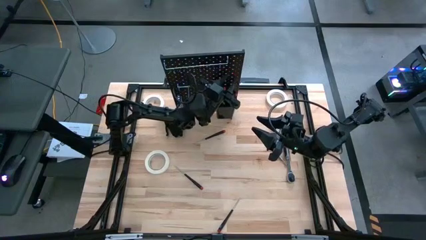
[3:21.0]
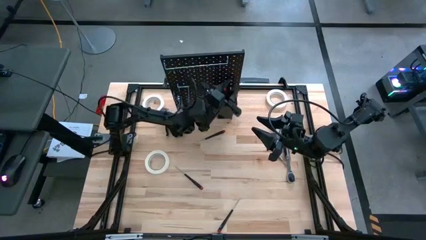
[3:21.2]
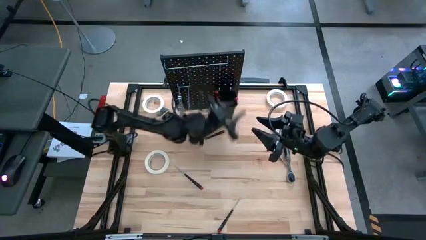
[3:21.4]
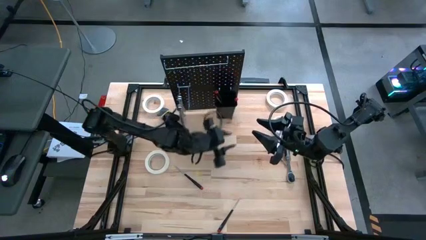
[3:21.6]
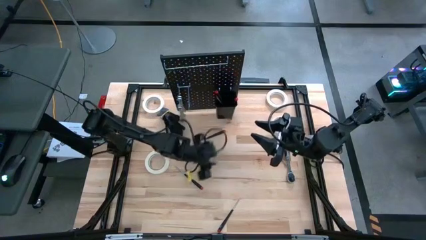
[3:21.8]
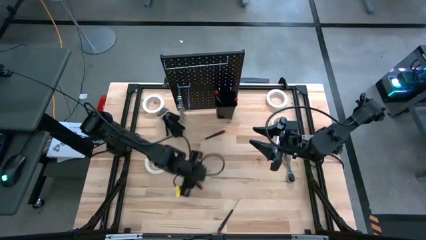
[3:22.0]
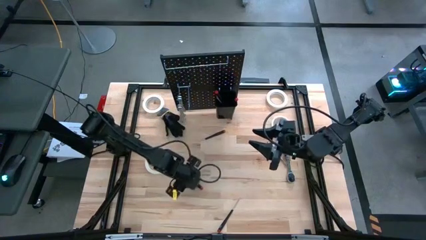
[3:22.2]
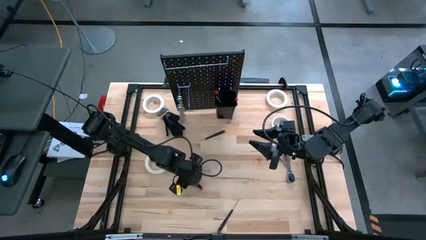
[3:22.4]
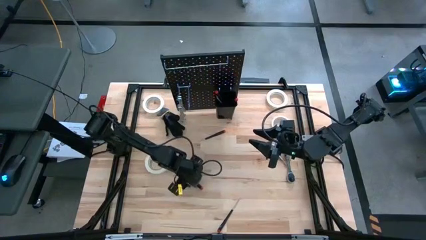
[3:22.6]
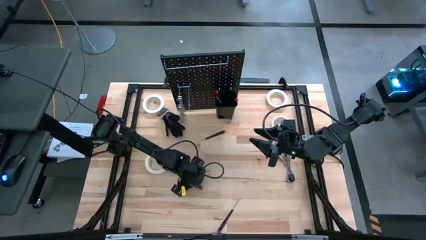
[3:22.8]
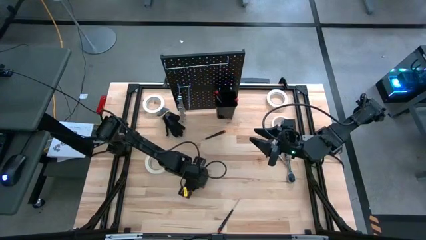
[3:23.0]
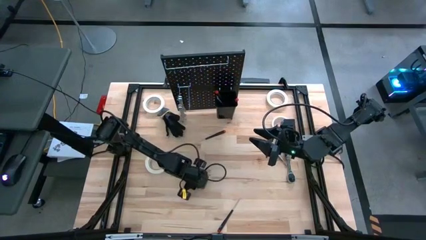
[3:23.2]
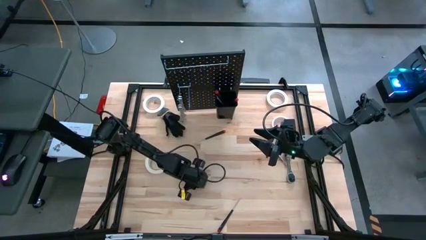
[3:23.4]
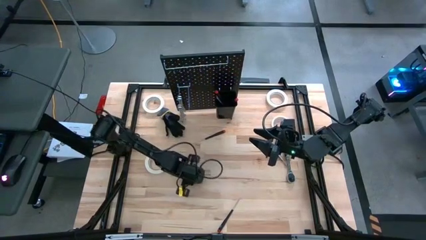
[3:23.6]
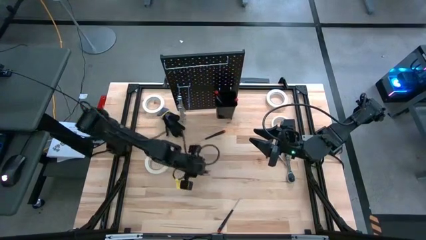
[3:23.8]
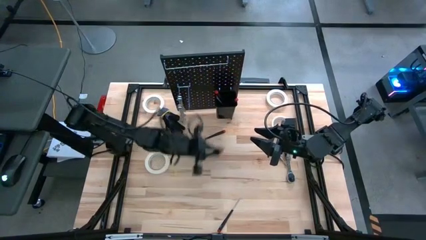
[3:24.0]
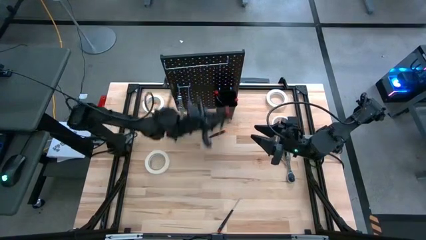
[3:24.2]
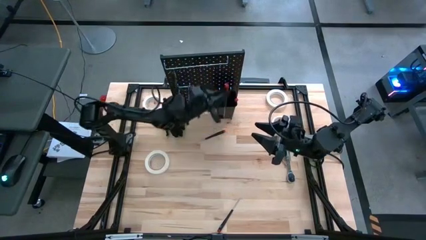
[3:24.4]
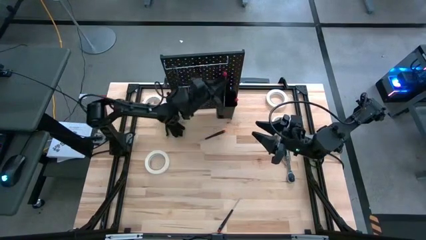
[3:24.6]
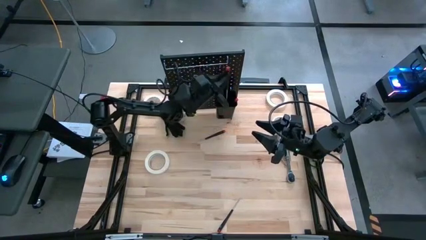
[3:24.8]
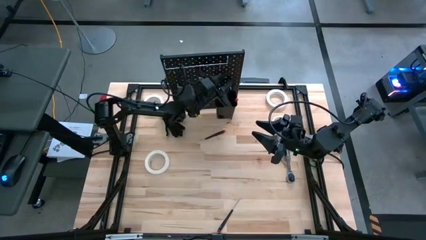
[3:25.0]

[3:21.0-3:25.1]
Task: Hang tools onto peg board
Put the black nut driver into the black bin on the peg board

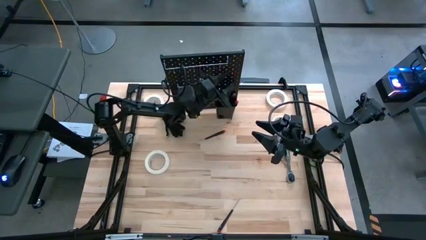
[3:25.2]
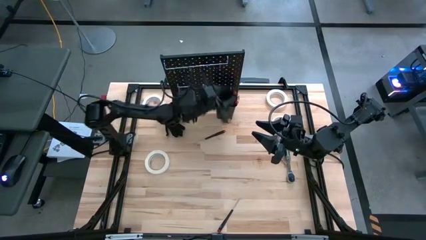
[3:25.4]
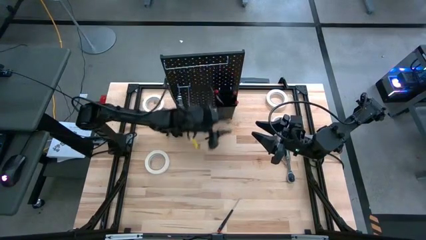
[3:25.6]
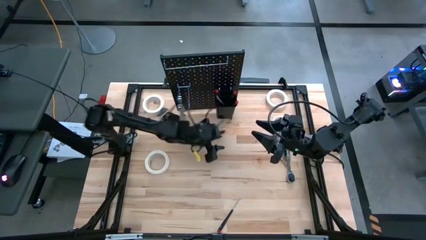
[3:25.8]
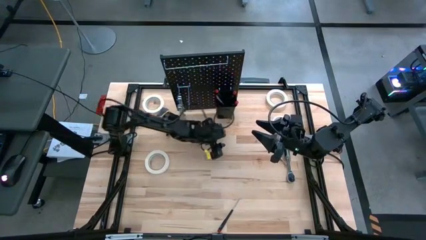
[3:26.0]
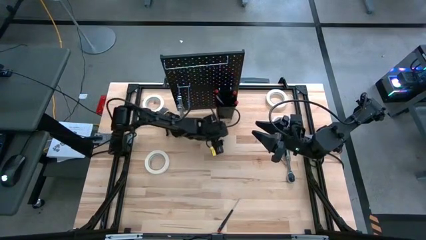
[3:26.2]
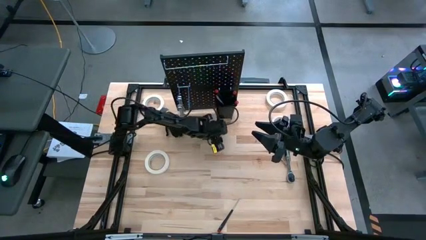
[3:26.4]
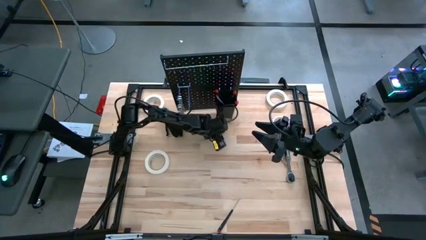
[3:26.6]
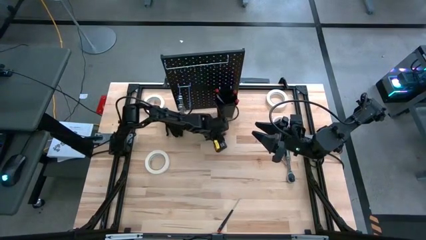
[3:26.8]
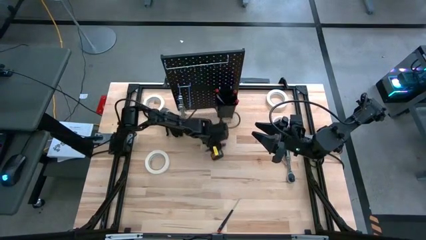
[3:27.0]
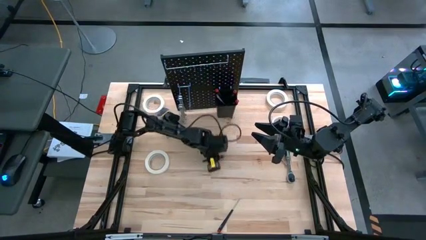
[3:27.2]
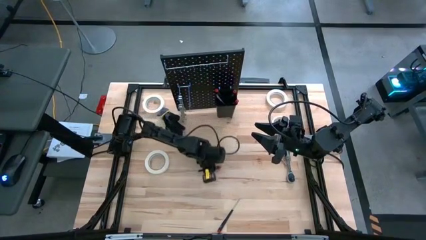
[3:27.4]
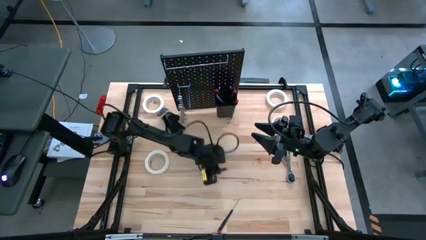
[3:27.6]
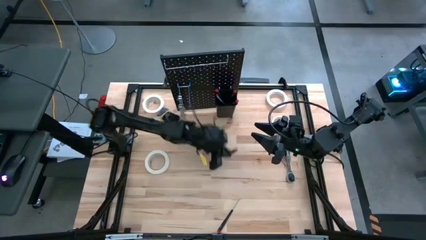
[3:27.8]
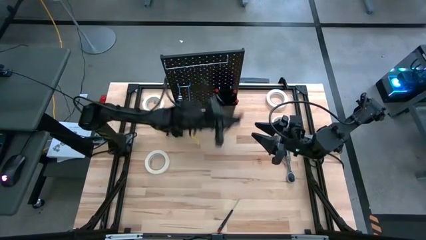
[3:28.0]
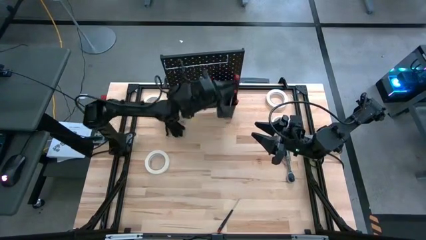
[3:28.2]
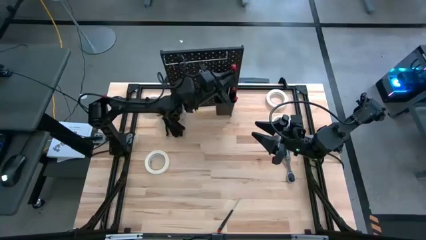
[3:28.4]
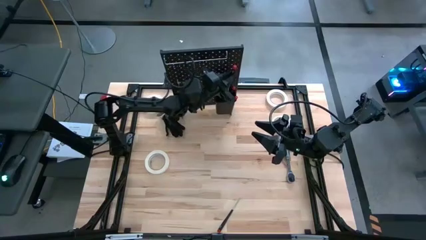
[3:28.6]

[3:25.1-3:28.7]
Put the black nut driver into the black bin on the peg board

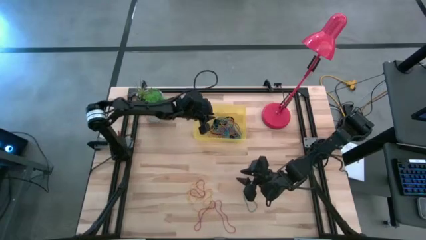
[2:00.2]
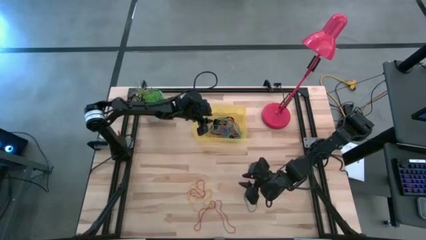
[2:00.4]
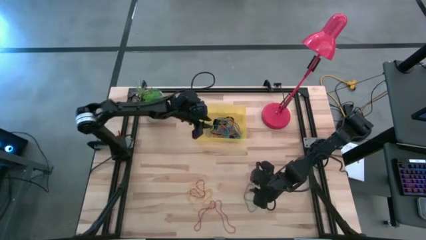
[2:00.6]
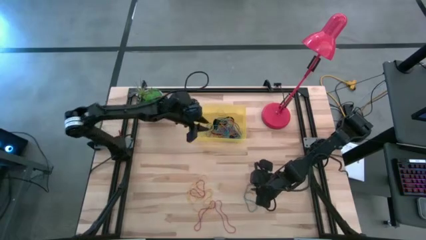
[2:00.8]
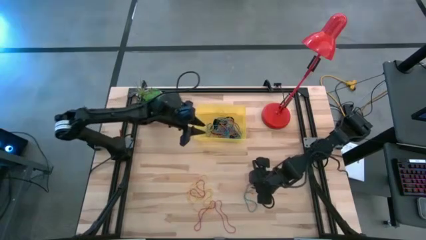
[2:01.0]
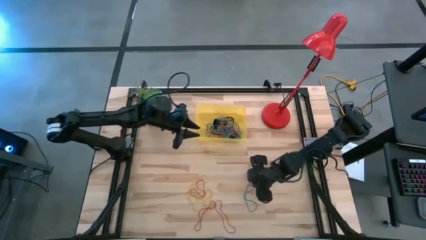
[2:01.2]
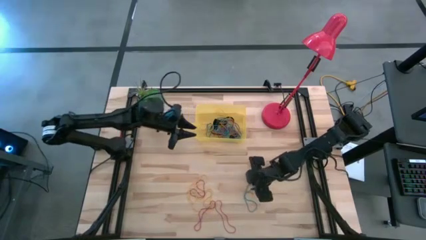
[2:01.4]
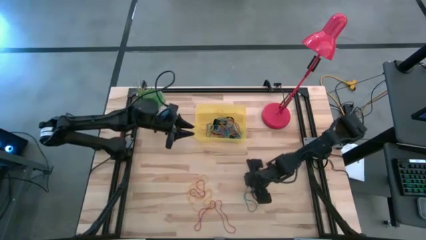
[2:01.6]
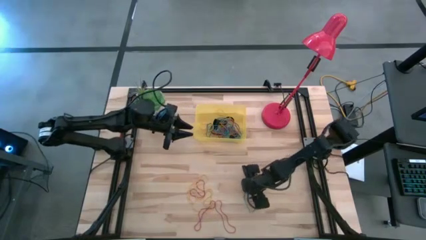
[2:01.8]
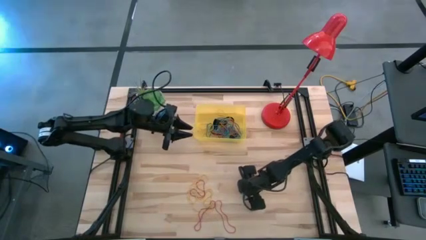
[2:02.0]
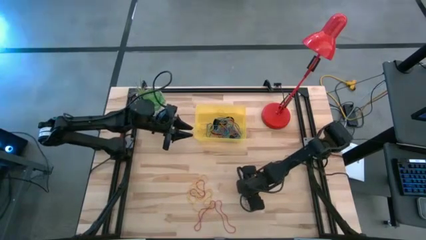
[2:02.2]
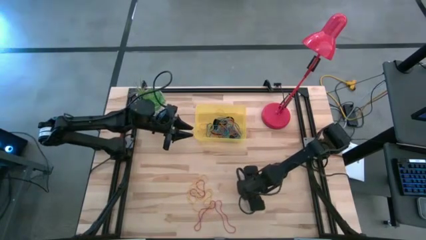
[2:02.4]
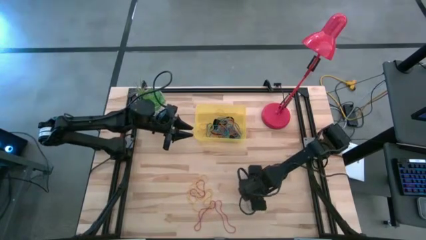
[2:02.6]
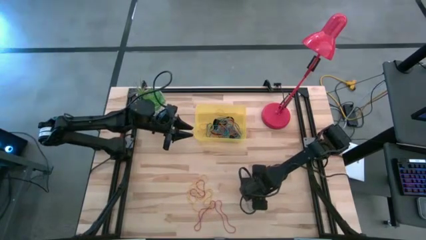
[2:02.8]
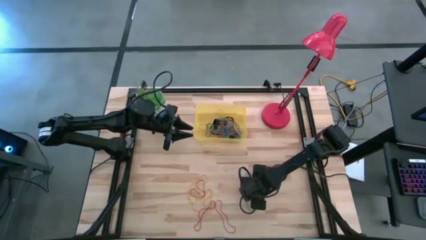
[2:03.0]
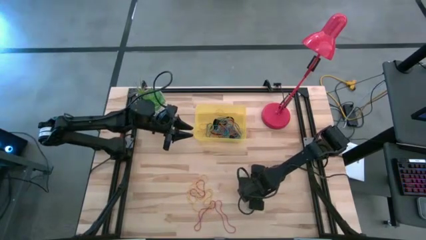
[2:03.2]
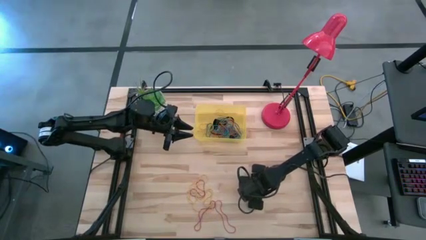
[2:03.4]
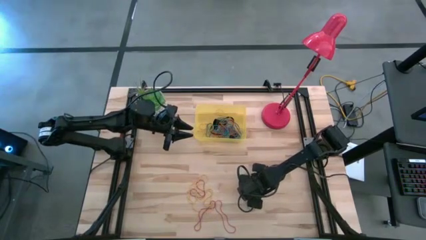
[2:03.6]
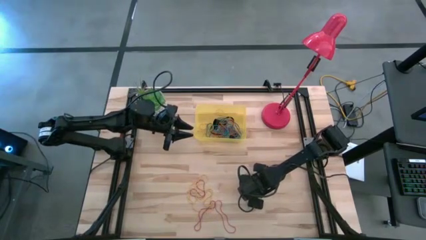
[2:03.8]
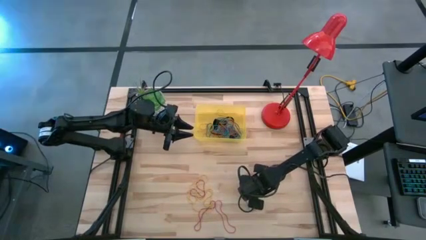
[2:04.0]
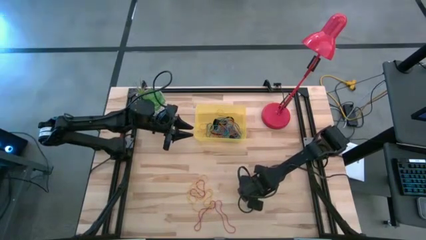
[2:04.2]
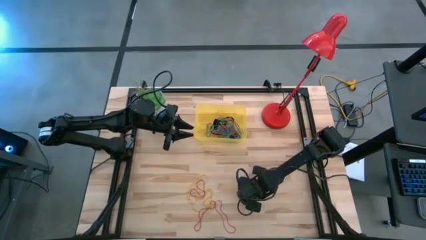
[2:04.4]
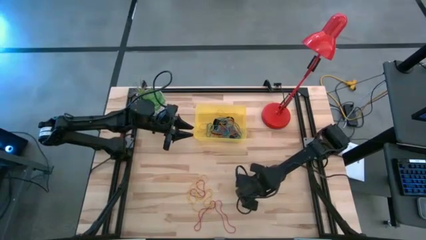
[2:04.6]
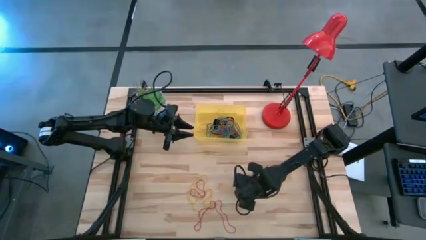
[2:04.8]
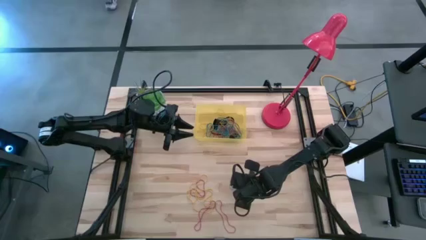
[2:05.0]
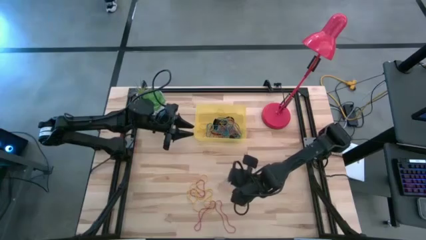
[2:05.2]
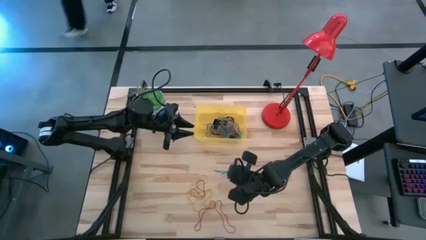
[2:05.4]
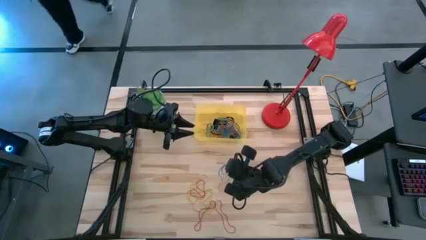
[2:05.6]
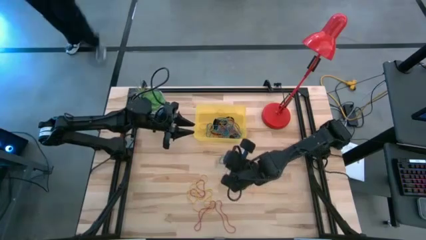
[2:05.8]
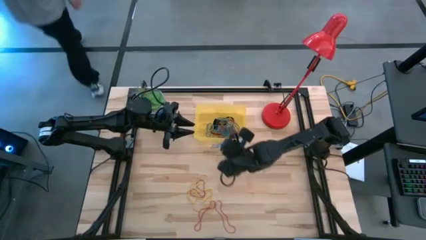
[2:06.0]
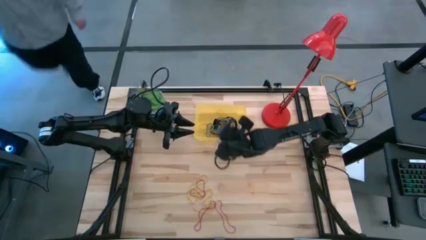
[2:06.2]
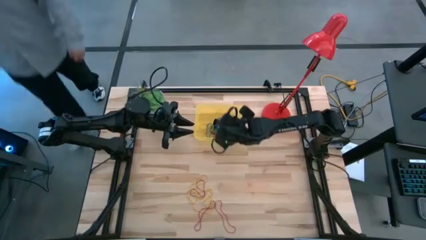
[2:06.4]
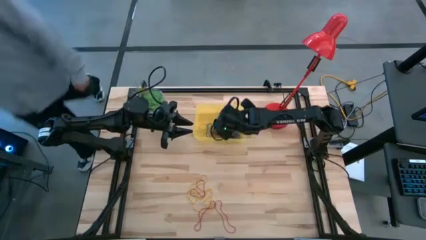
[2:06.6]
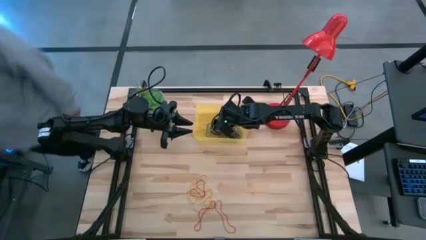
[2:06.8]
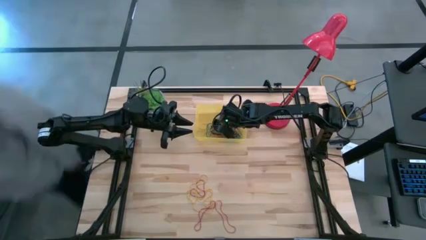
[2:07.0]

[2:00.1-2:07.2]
Task: Pick and place rubber bands into bin
Put the blue rubber band into the yellow bin
